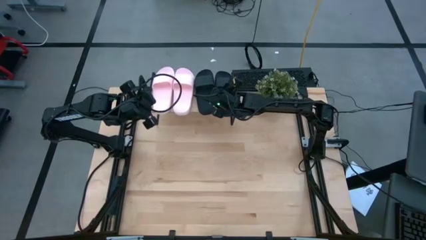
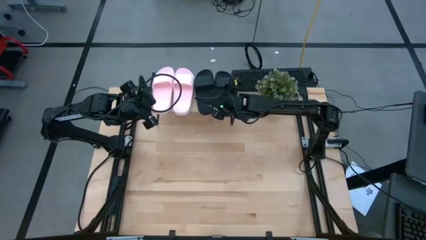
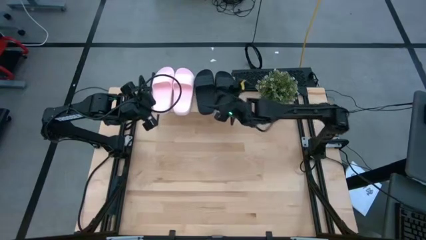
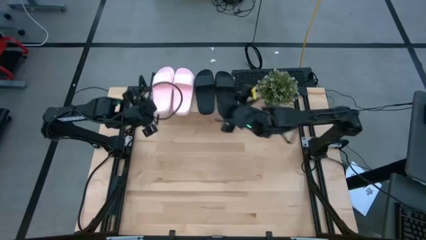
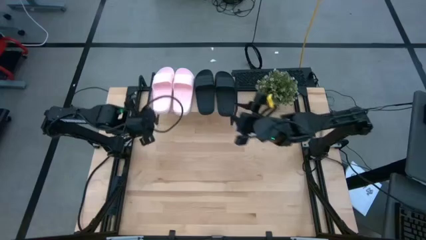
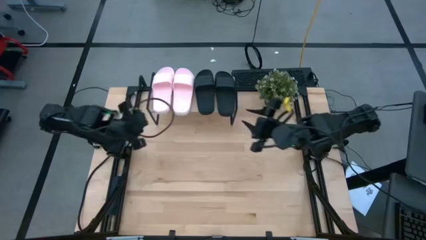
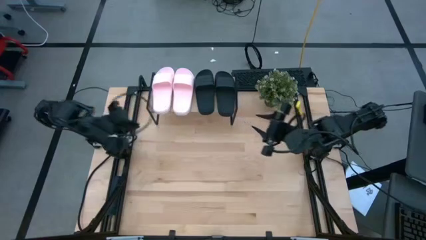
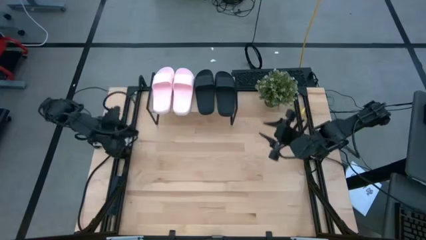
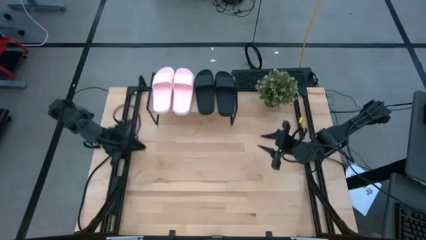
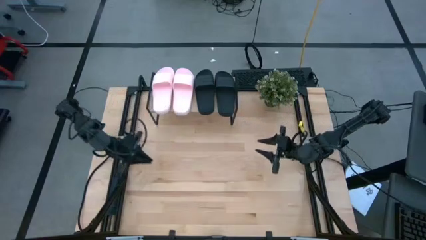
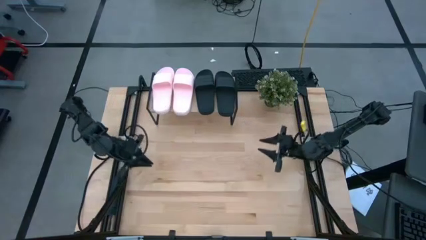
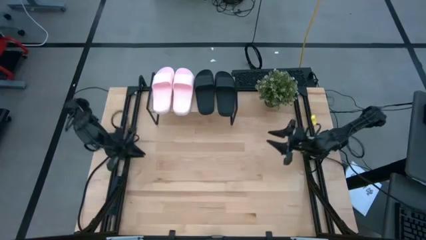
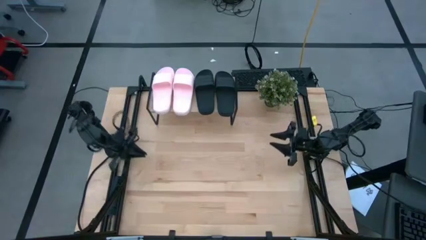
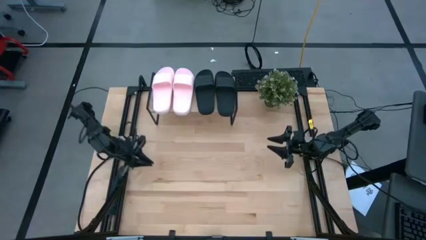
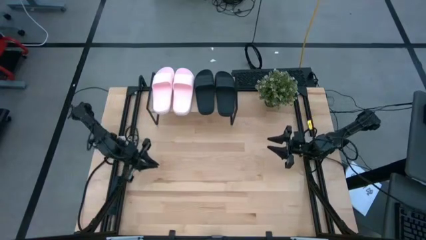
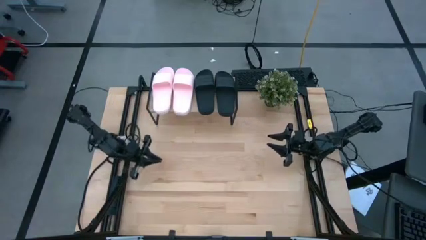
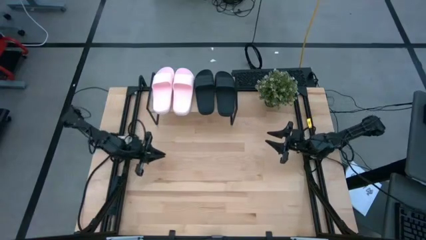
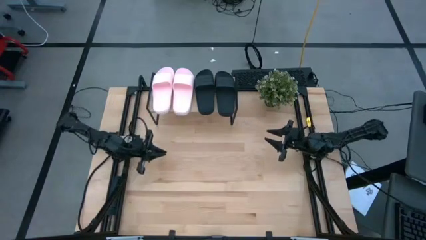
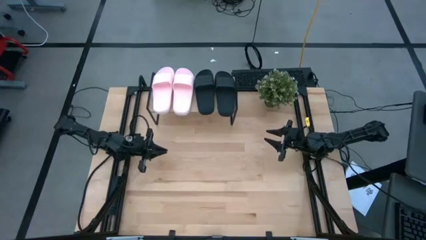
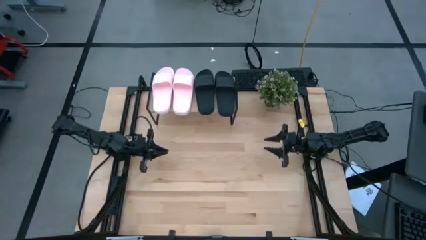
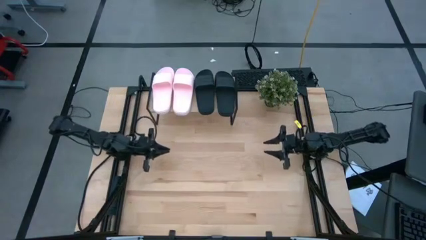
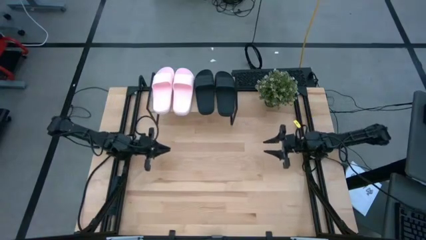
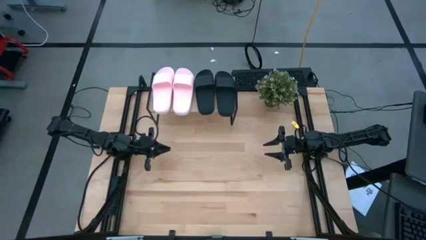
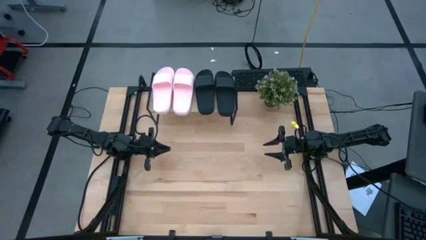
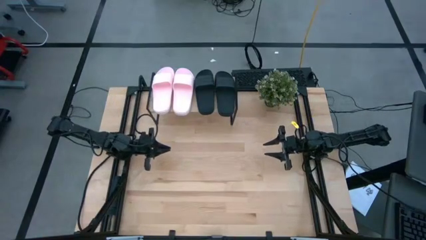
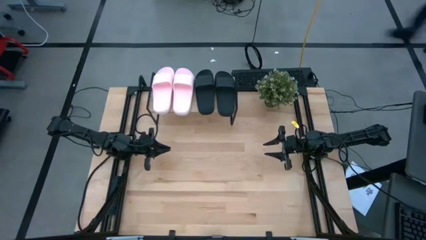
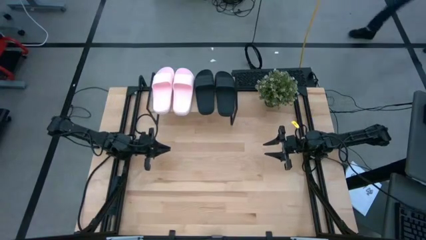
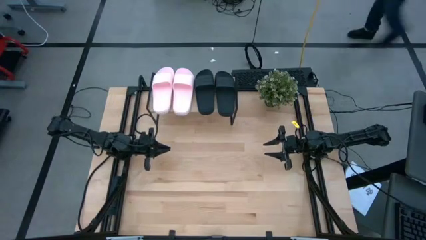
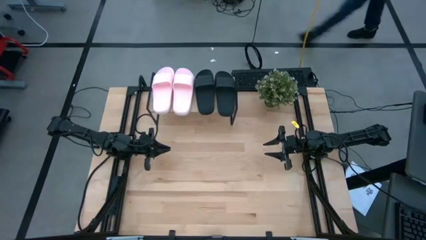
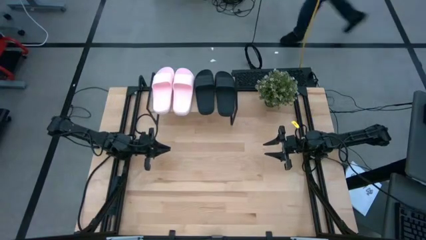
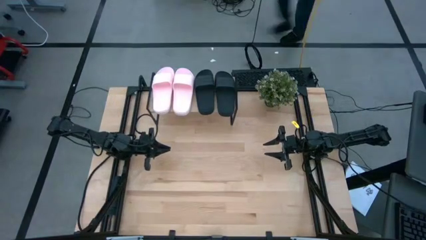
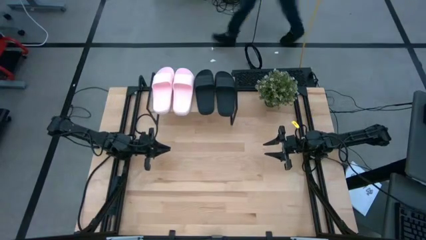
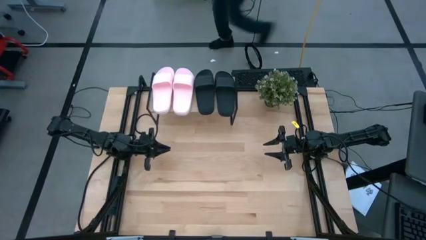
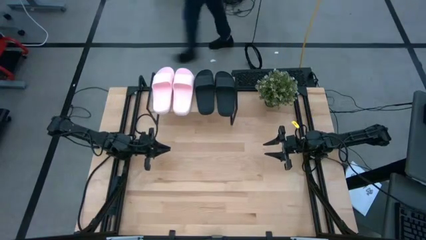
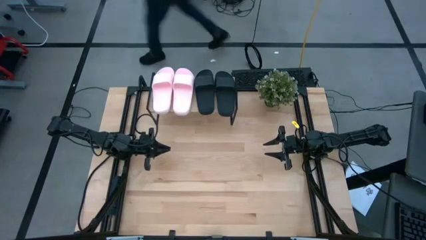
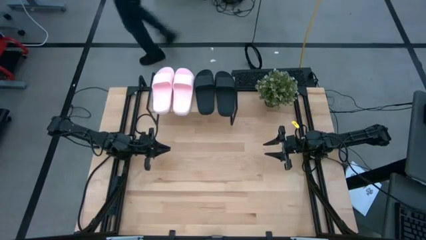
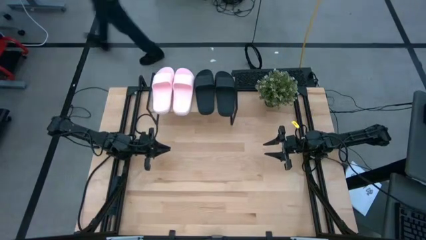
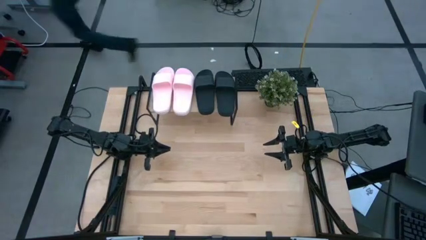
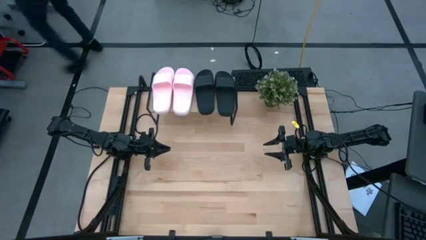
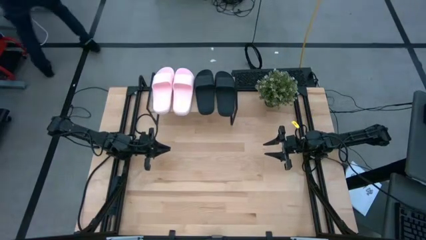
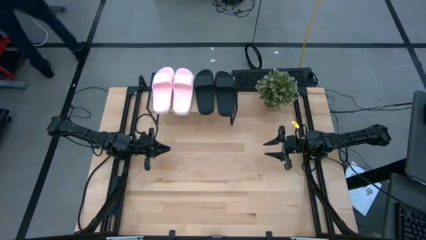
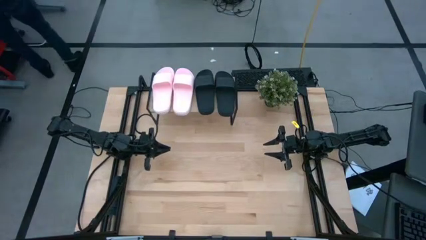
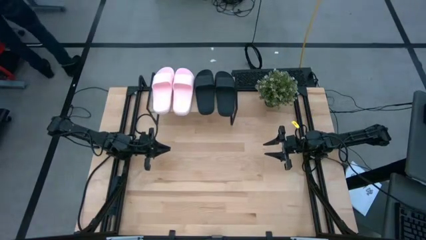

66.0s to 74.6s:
Task: Pick and place slides into the shelf
Return to Home Position

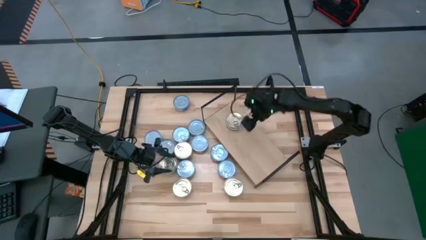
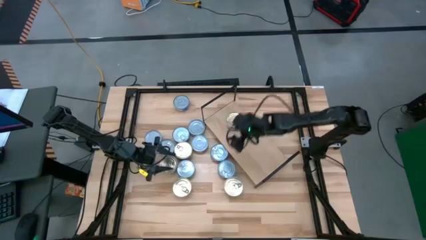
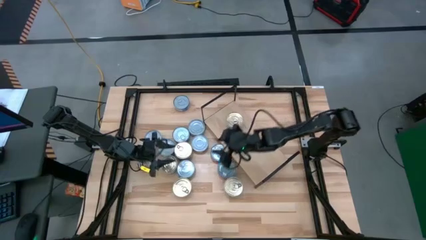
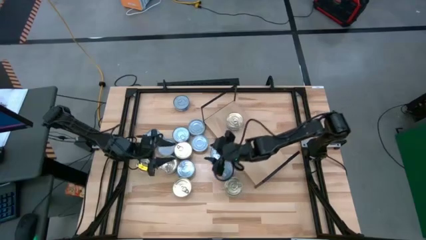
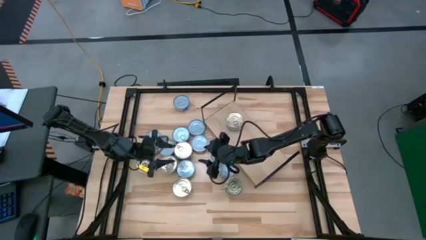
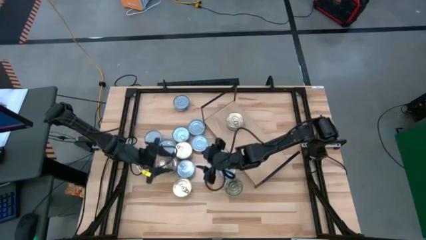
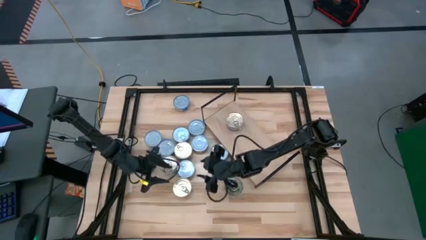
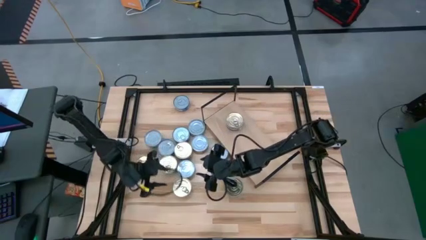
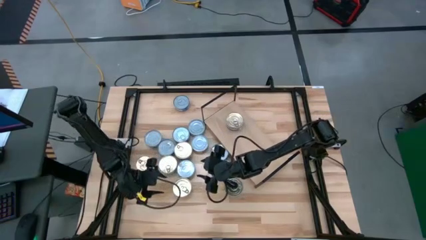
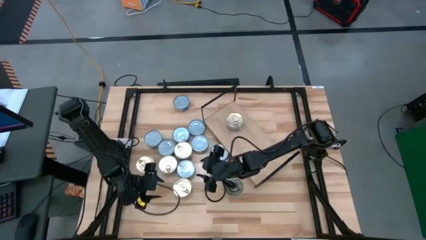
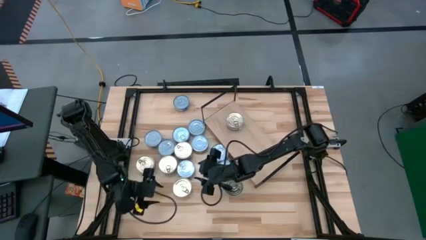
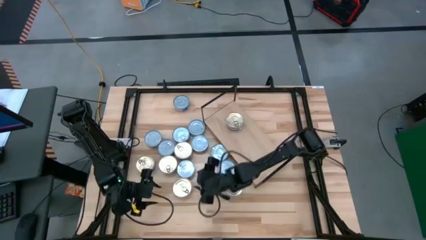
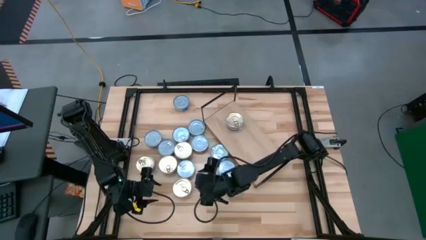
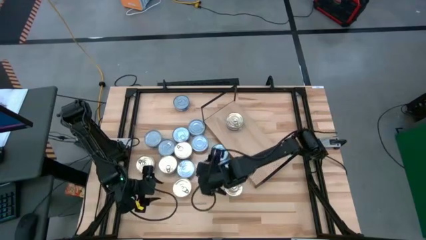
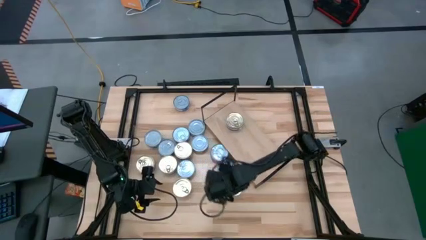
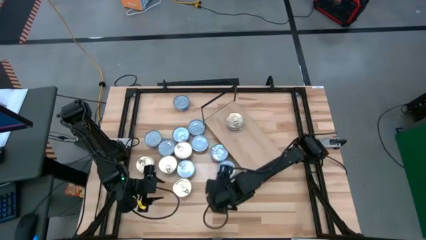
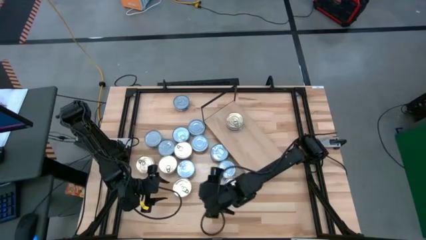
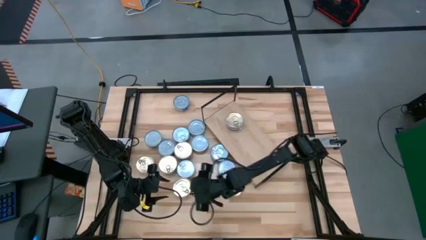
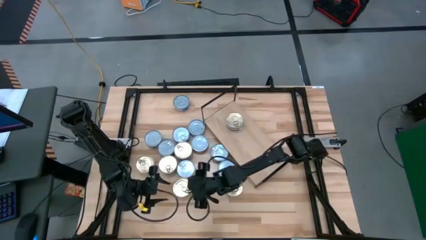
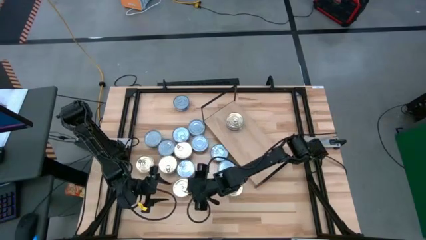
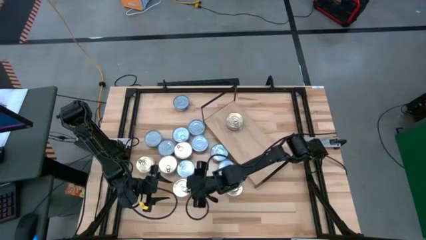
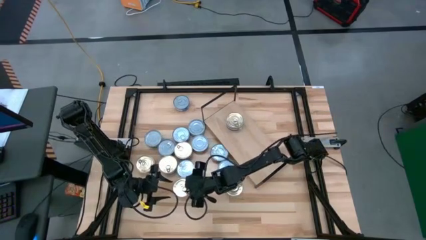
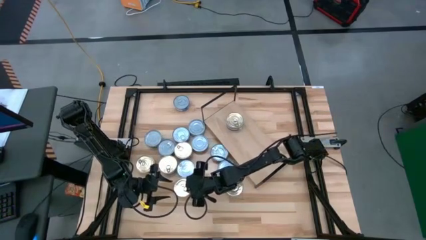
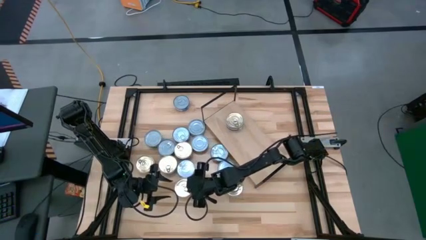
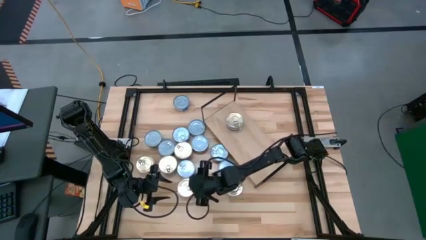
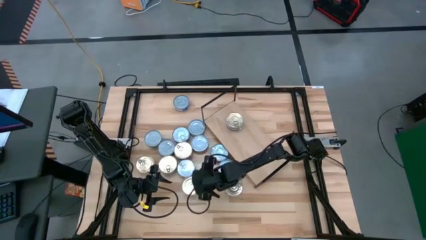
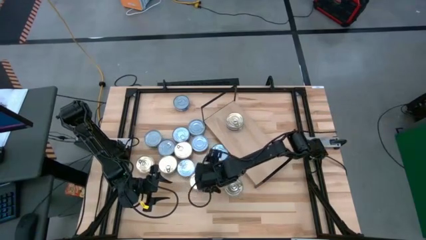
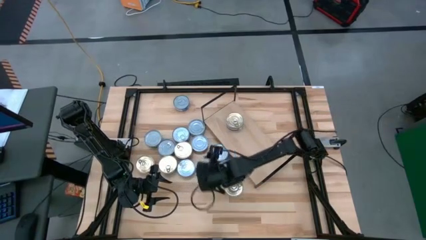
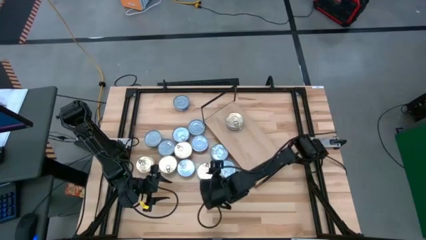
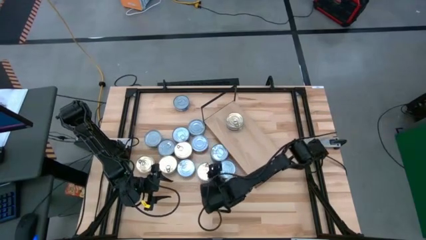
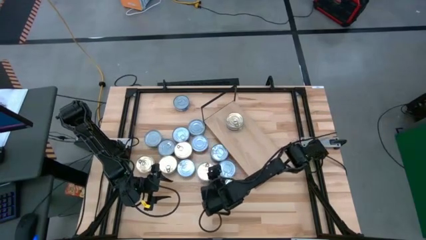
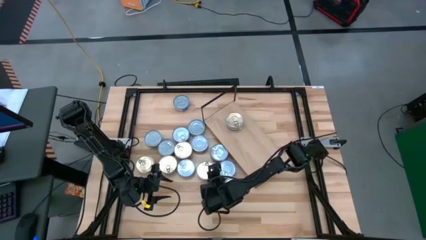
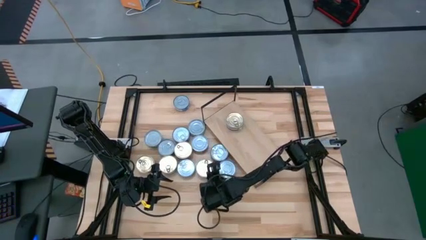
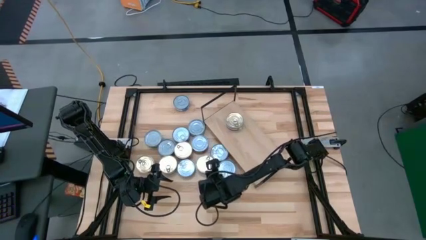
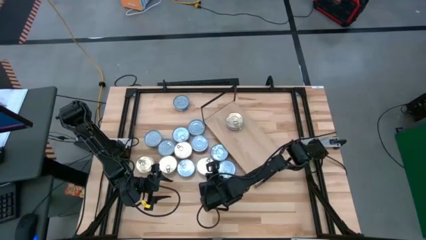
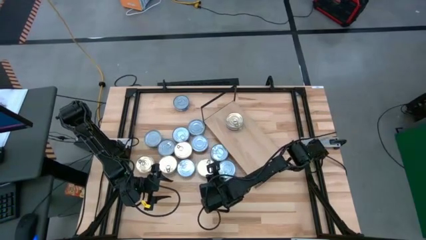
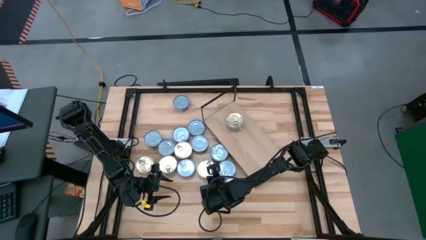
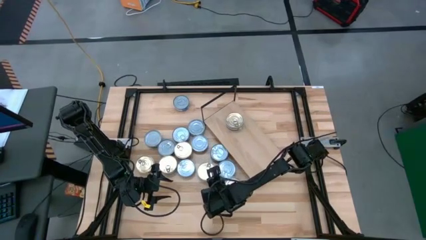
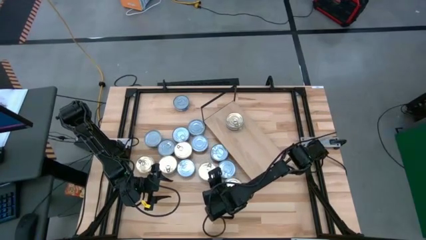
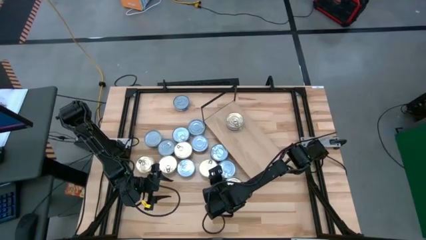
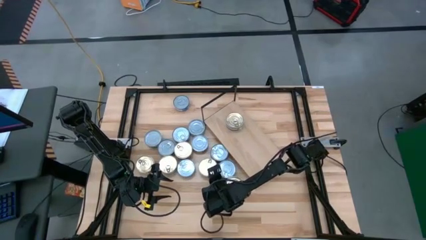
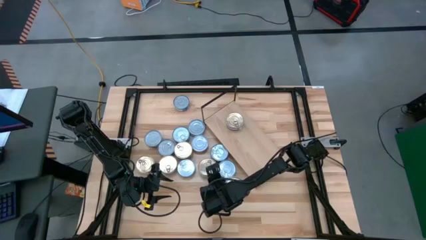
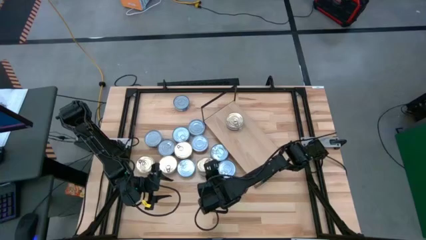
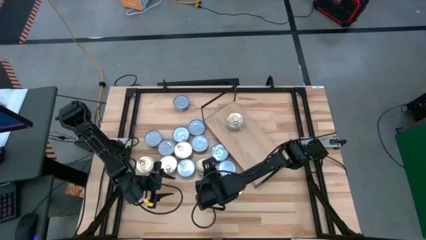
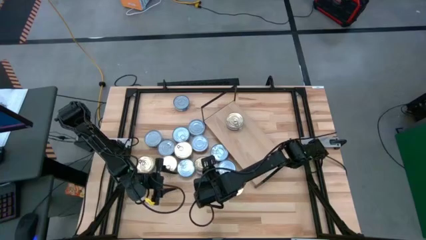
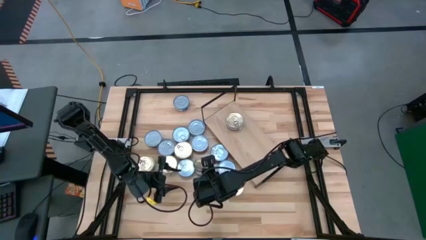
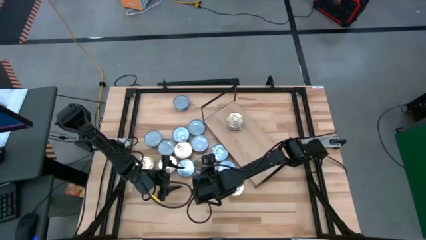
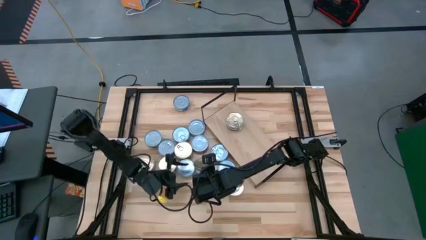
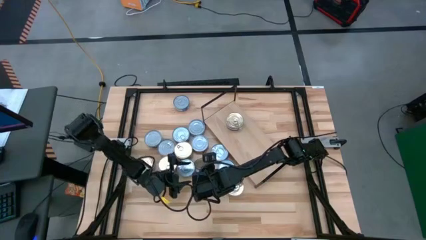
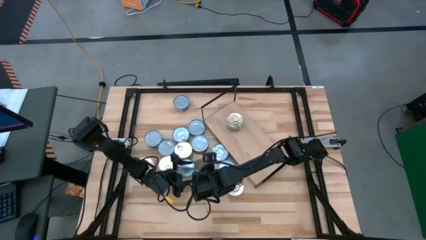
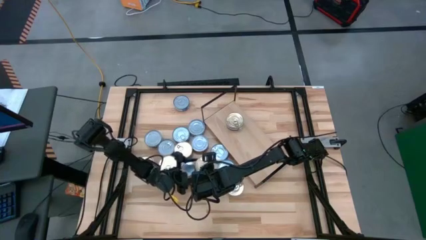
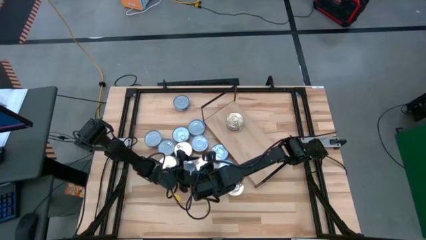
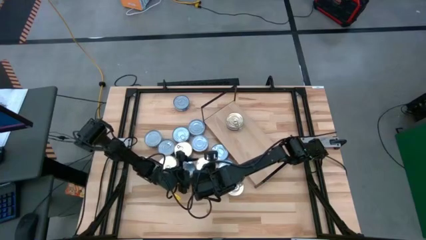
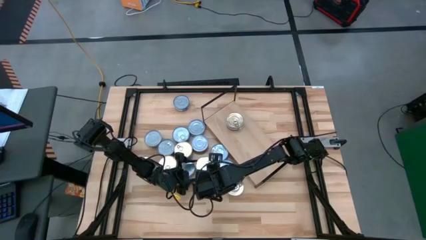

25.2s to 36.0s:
Task: Stack canned seafood by type on shelf
Stack the blue tuna can on top of the blue tuna can on the shelf
